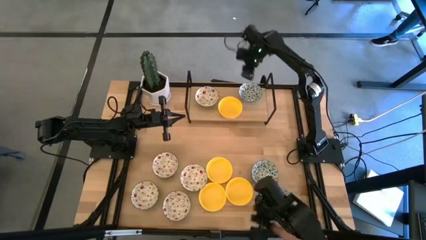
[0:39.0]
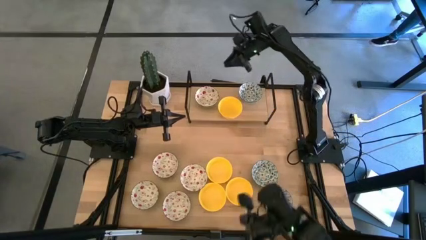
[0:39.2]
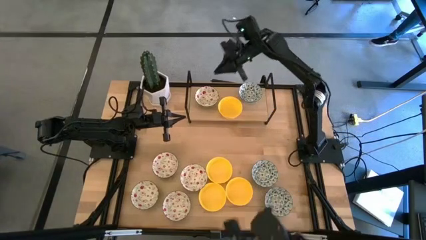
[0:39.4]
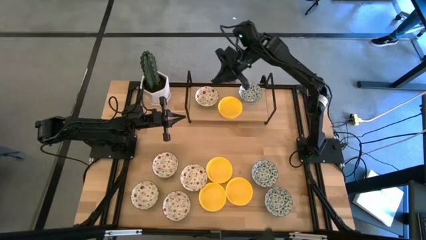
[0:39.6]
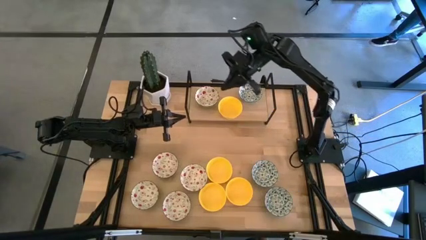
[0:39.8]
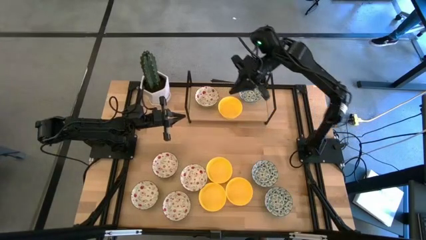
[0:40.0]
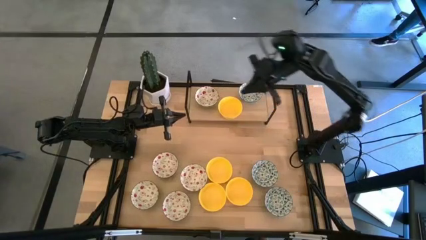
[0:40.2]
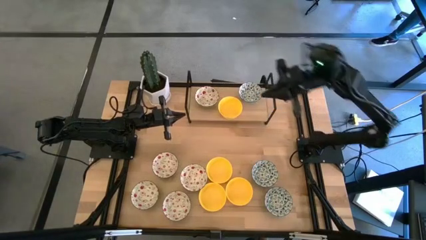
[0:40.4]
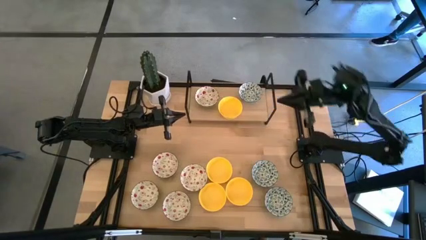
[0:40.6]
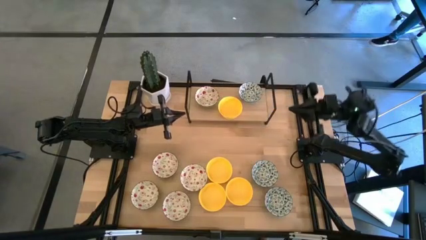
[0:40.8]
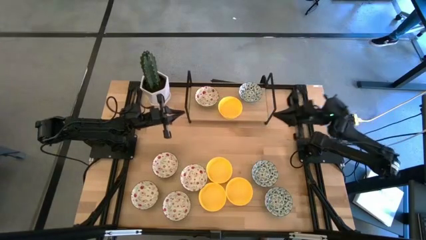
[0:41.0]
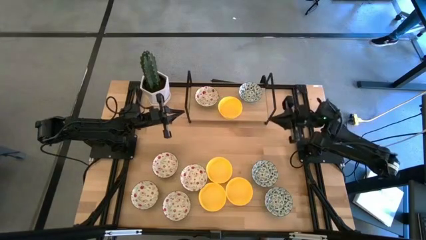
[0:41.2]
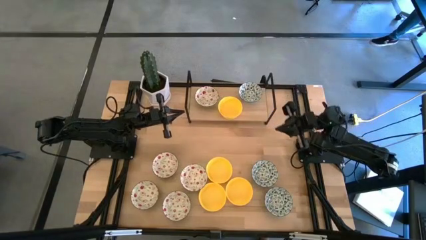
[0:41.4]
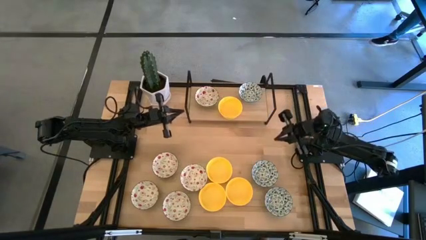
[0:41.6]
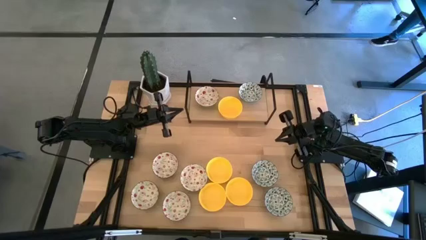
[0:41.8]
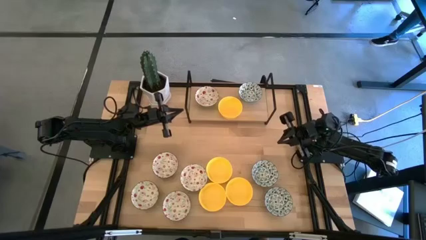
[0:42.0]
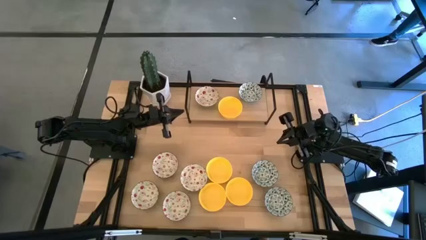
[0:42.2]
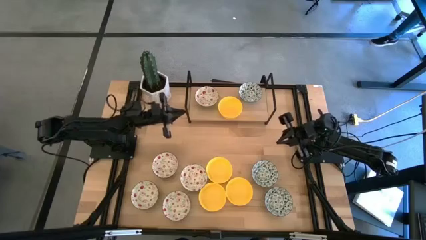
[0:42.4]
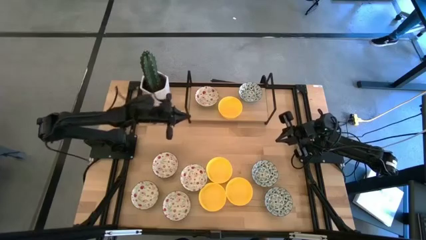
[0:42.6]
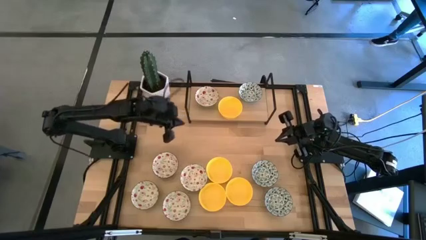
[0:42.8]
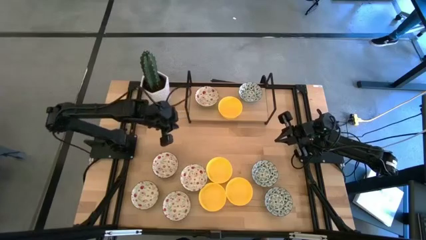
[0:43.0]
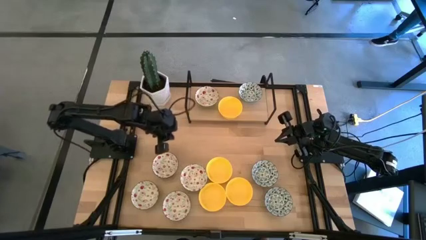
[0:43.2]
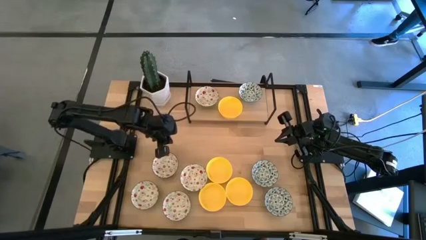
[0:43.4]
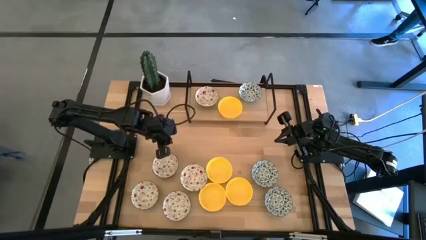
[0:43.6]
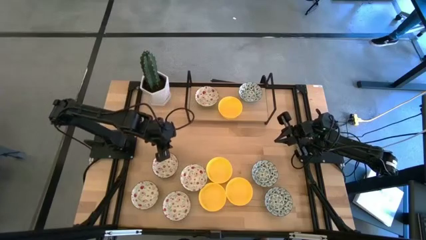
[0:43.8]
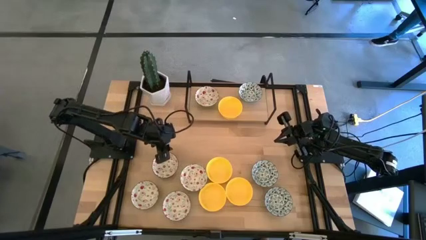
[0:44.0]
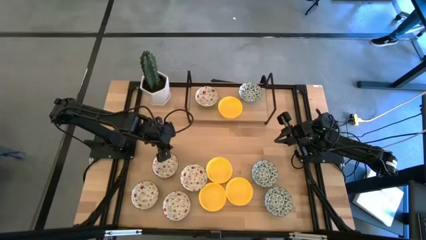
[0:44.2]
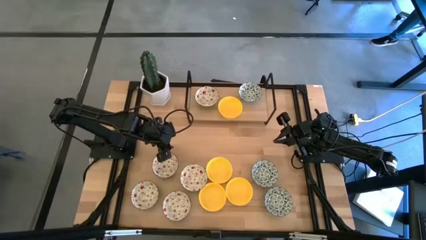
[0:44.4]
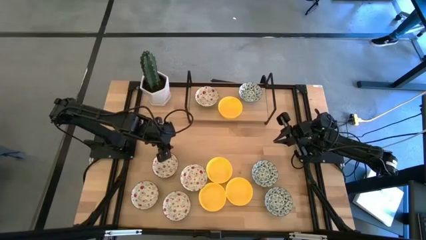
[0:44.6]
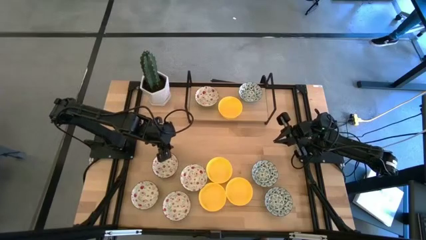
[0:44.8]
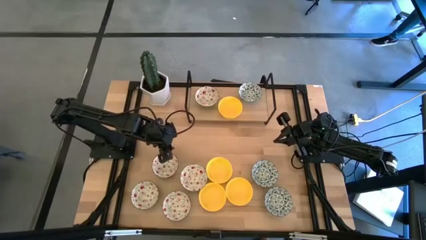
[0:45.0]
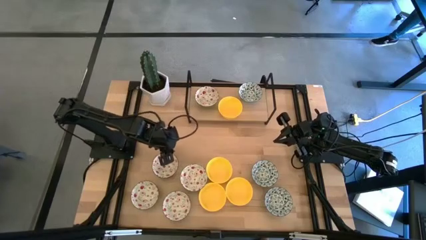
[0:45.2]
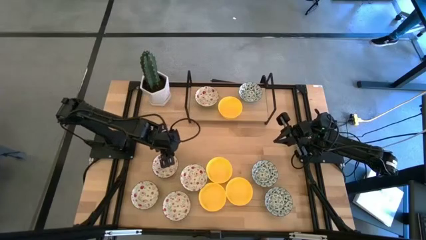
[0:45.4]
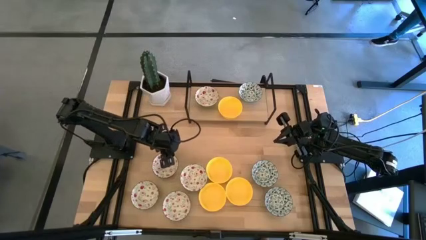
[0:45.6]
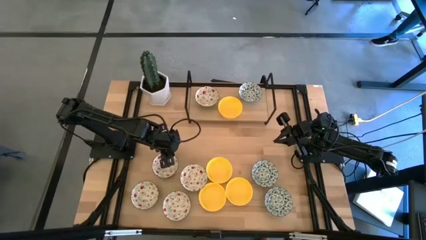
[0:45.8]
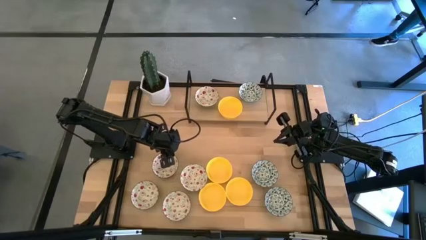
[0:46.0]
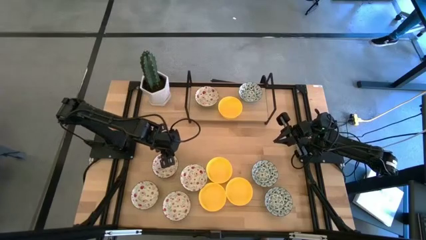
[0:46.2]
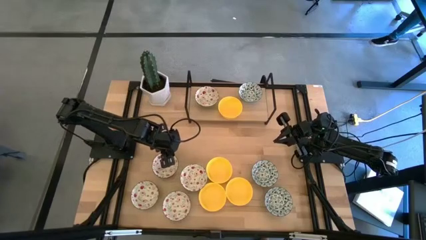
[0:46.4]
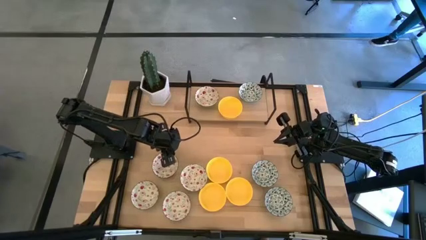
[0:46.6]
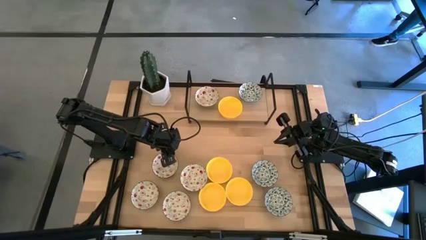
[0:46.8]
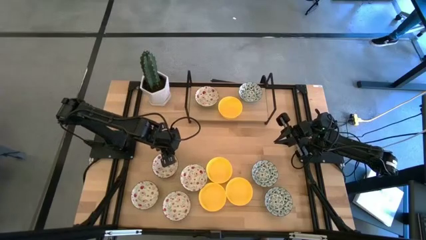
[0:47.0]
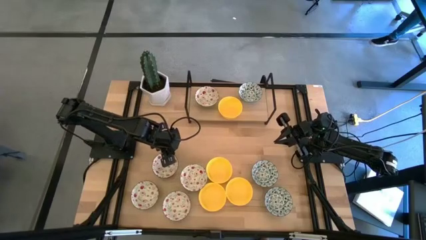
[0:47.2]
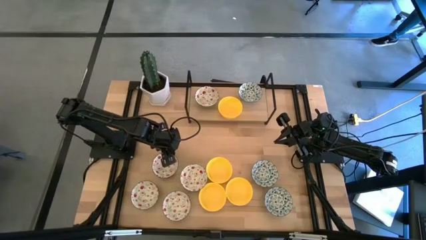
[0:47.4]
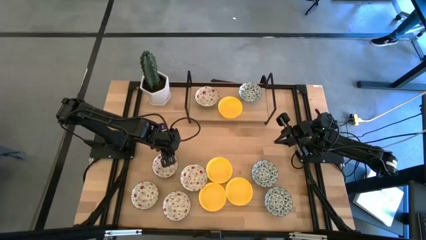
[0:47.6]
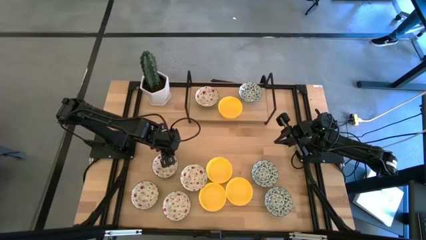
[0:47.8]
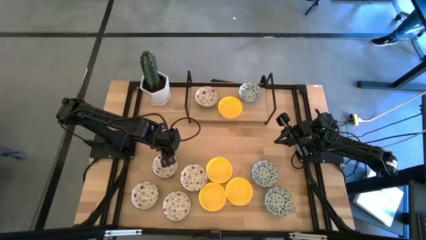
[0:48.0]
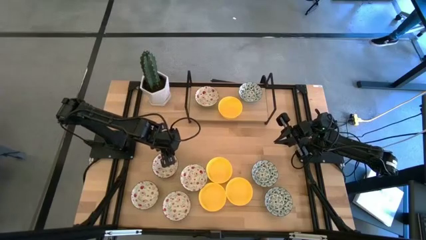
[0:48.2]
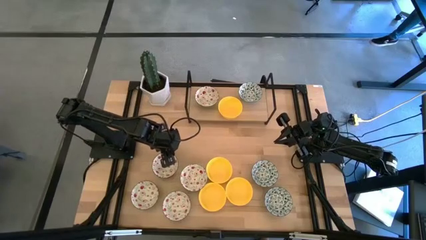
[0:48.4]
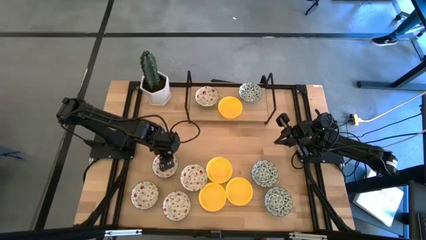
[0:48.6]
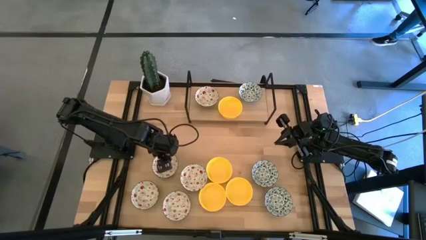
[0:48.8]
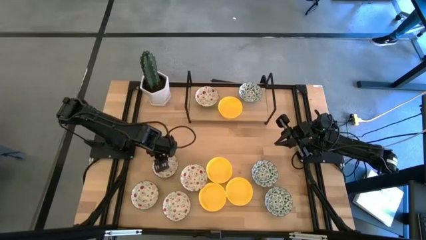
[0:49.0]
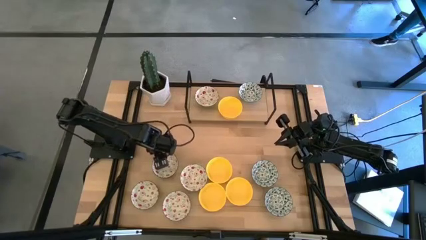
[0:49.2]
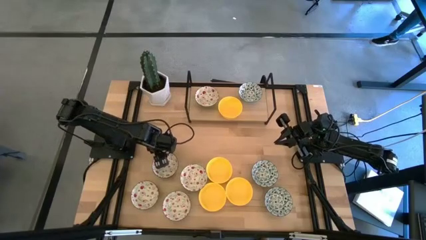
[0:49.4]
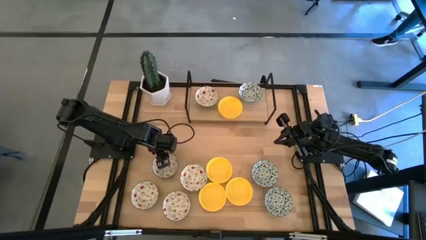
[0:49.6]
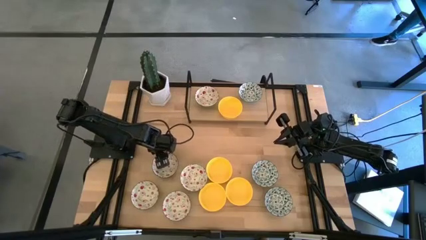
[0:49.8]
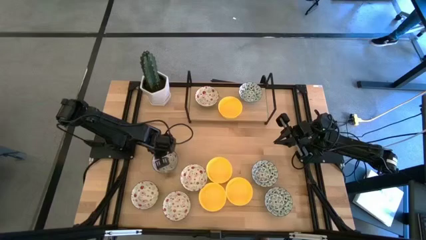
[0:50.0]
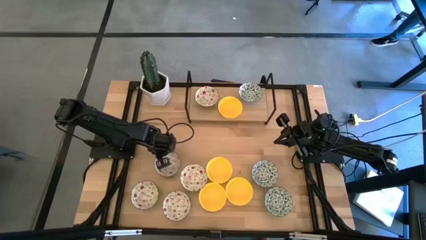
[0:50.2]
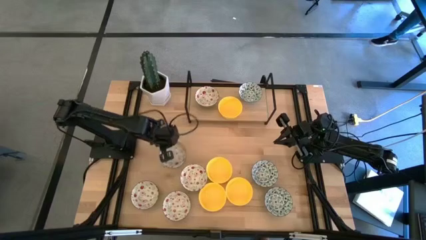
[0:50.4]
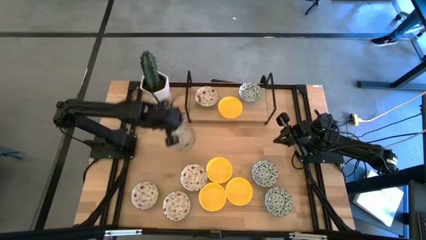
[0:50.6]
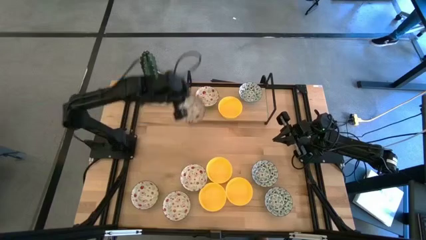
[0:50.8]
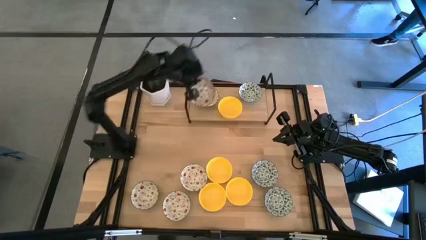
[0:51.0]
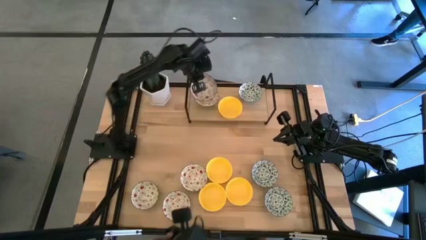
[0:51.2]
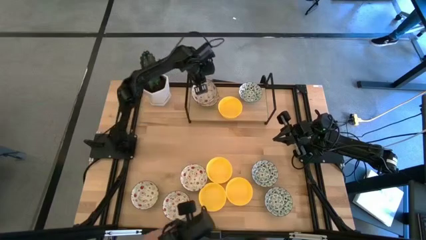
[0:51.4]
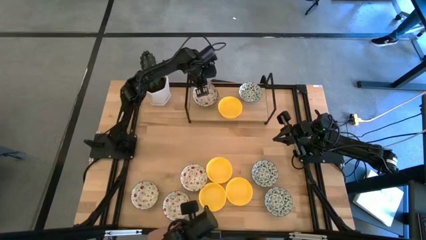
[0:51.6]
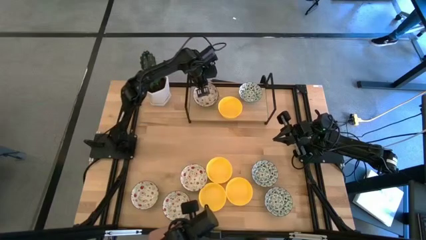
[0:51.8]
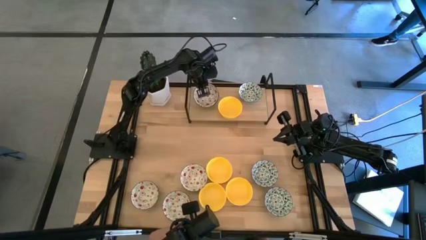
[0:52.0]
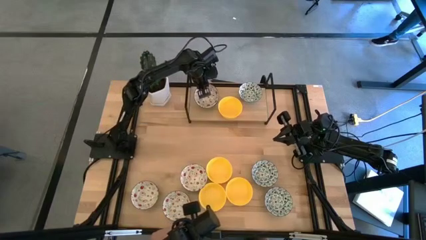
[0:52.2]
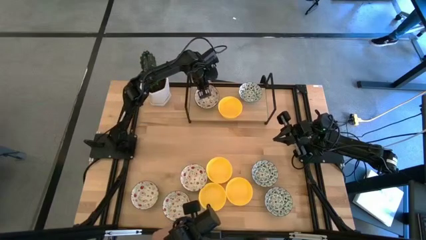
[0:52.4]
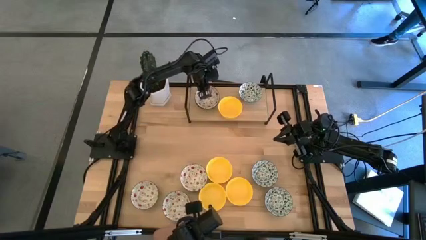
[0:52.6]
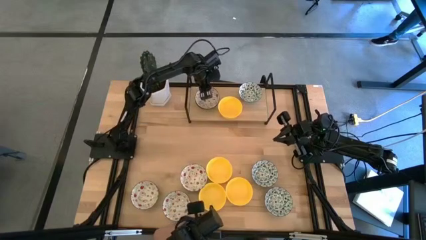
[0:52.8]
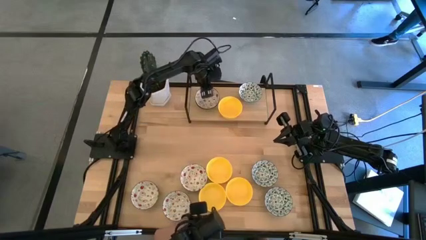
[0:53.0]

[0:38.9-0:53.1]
Task: Pick & Place Mini bowls
Stack the red green bowl on top of the red green bowl on the shelf
